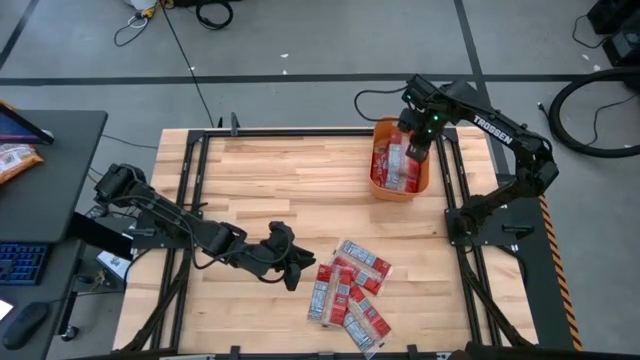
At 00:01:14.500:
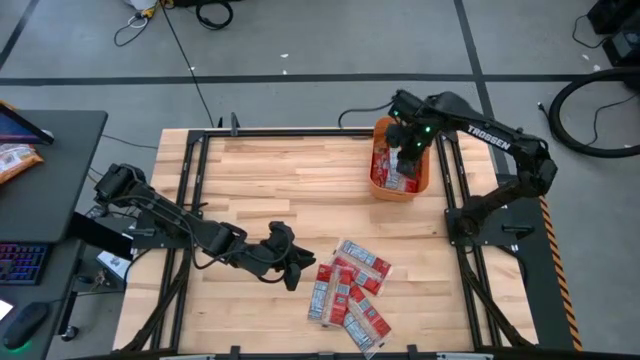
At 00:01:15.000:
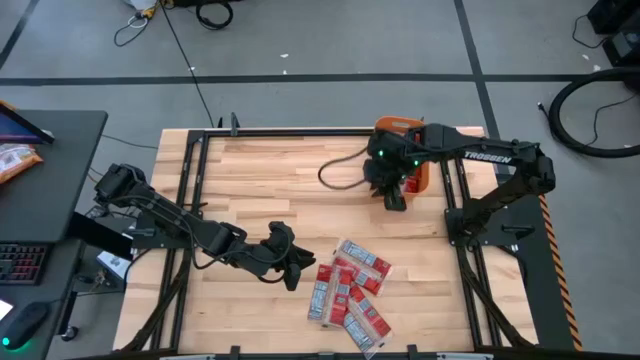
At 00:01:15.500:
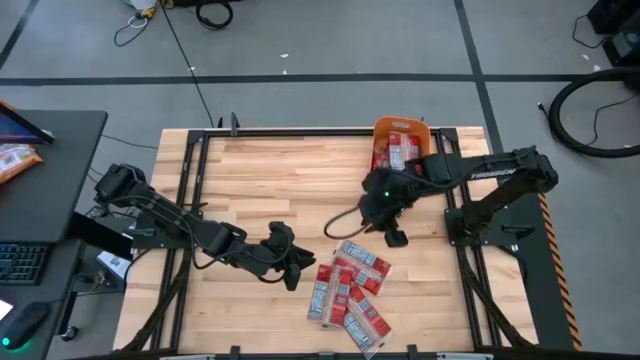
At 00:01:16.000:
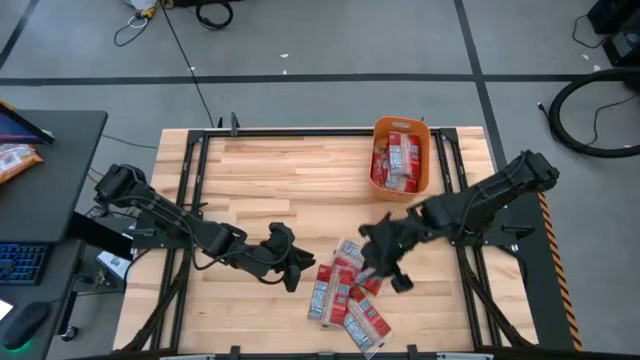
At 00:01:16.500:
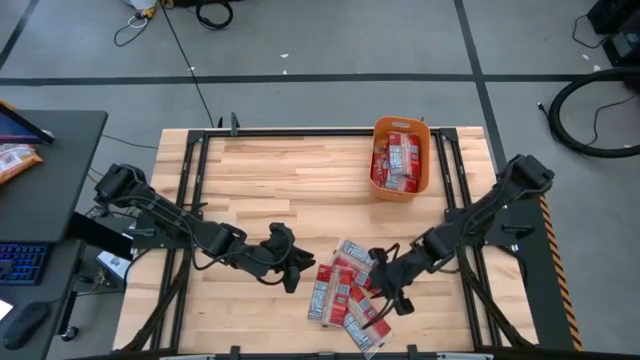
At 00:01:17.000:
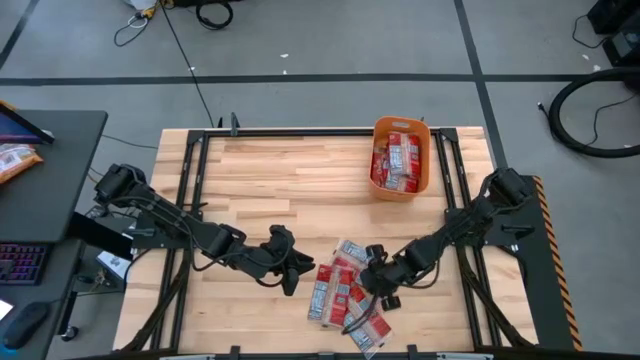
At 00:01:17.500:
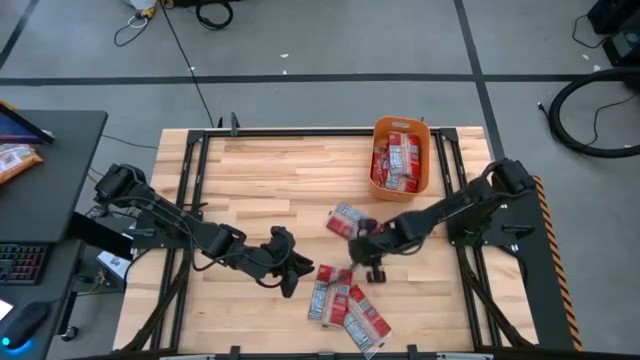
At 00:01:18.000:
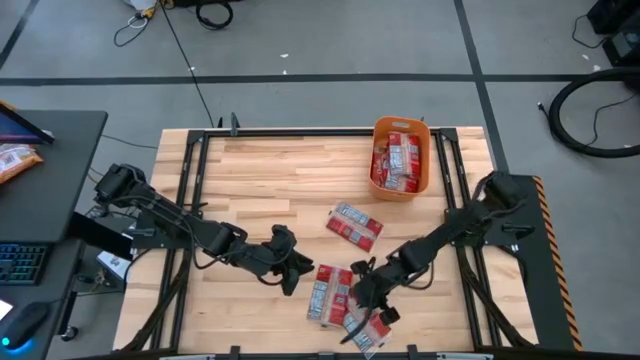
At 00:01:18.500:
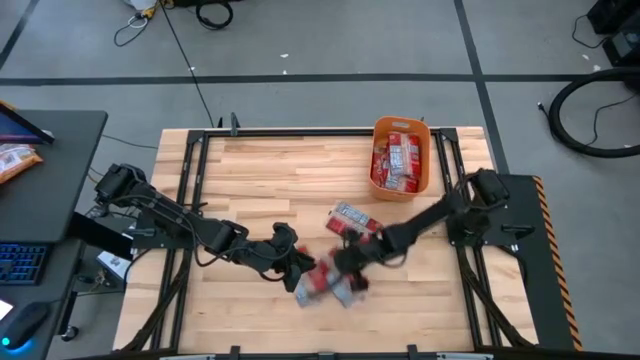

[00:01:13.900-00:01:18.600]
Task: Sort popcorn bags into baskets
Move the red popcorn bags to the center of the table

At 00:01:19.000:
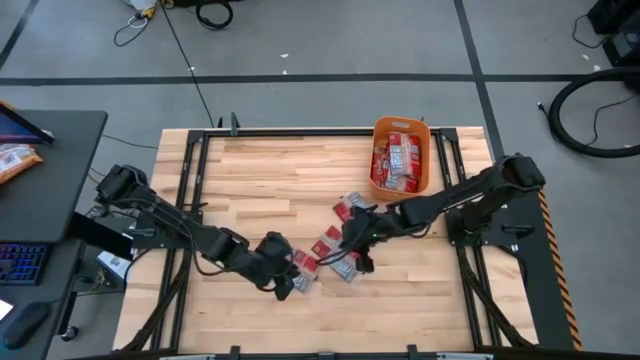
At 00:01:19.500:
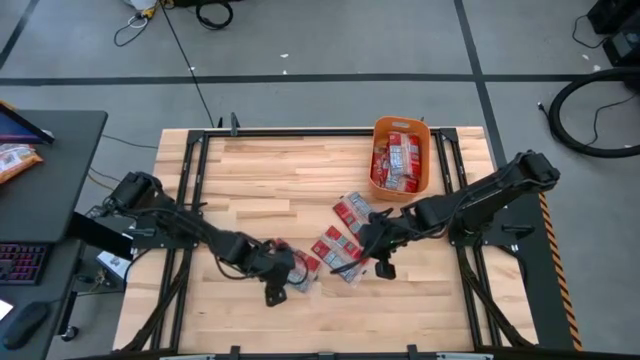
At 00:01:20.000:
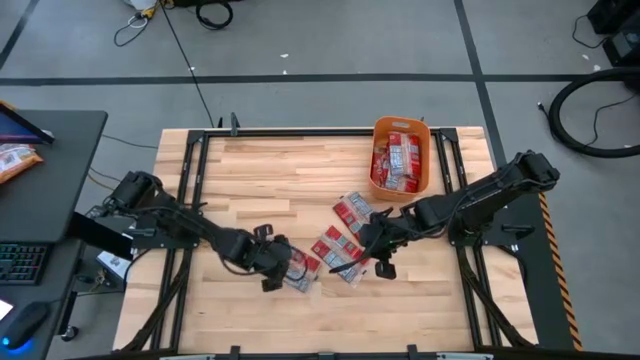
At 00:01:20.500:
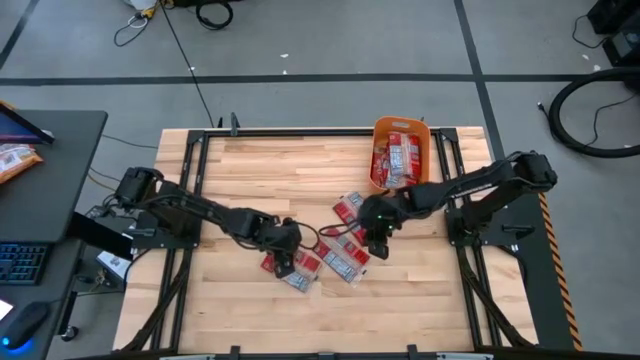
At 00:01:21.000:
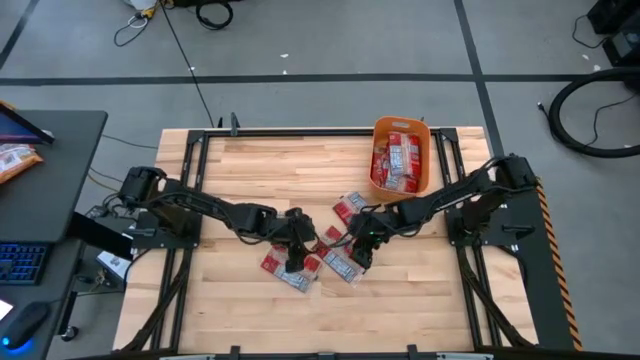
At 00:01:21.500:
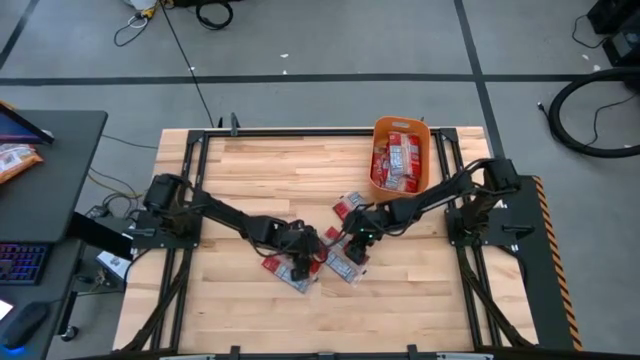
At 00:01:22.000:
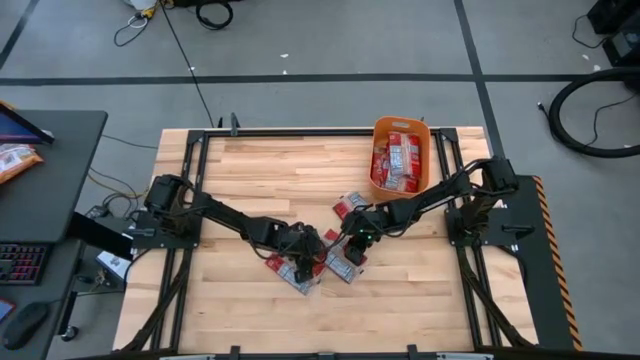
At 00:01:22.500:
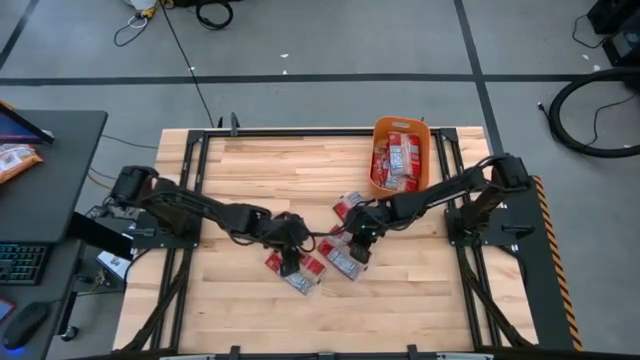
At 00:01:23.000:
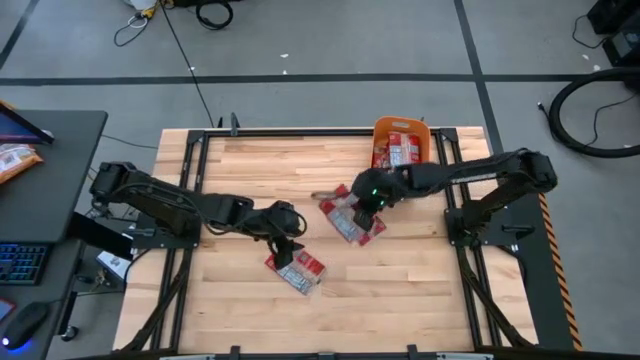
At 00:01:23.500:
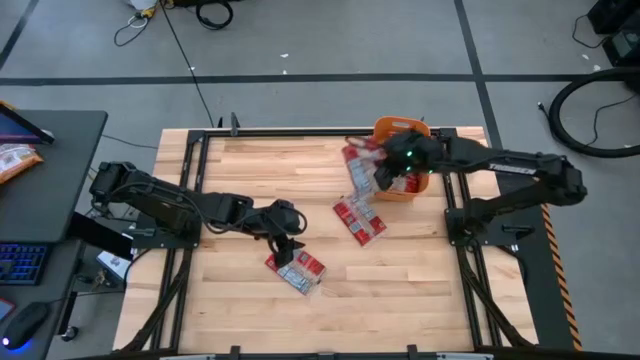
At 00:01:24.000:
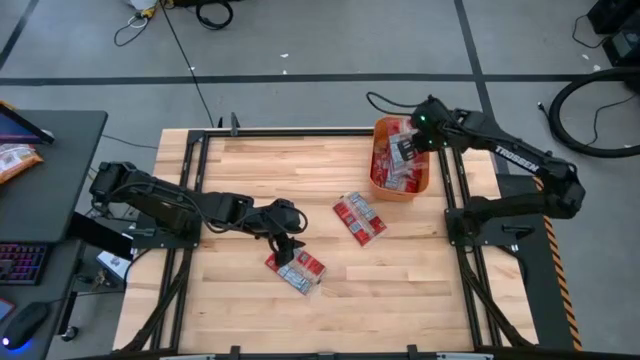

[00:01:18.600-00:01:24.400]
Put the red popcorn bag into the orange bin

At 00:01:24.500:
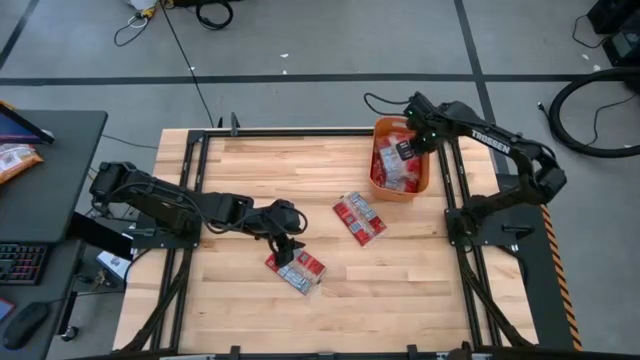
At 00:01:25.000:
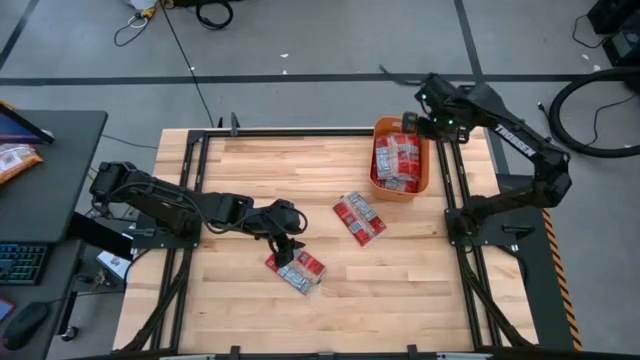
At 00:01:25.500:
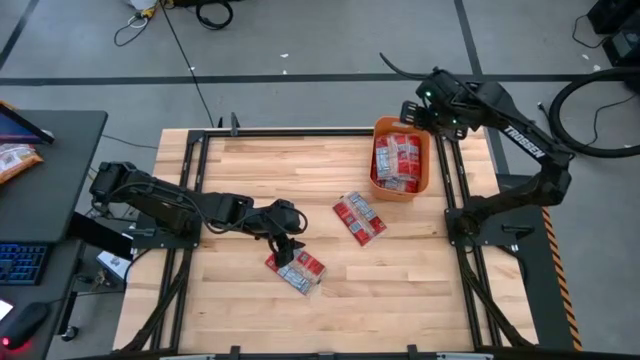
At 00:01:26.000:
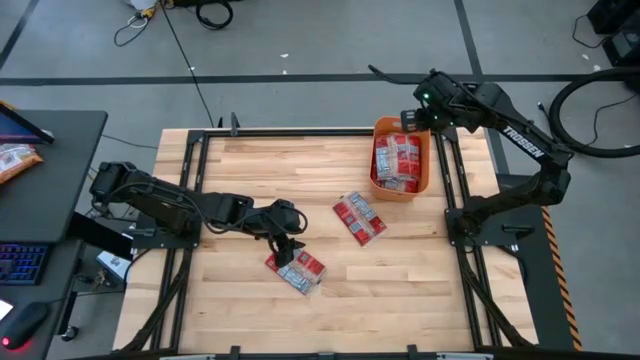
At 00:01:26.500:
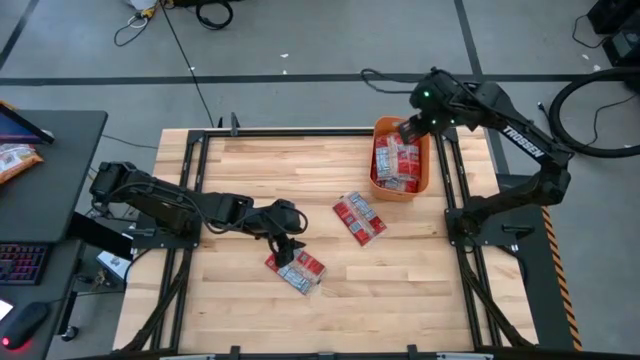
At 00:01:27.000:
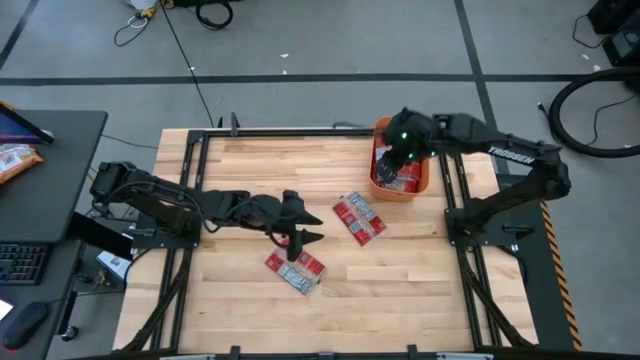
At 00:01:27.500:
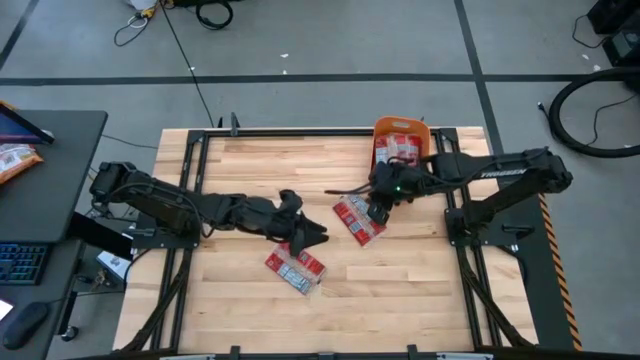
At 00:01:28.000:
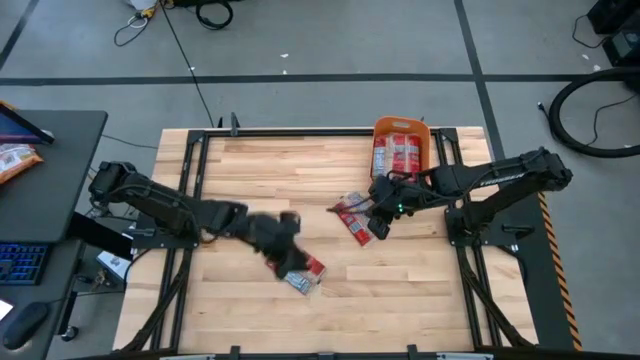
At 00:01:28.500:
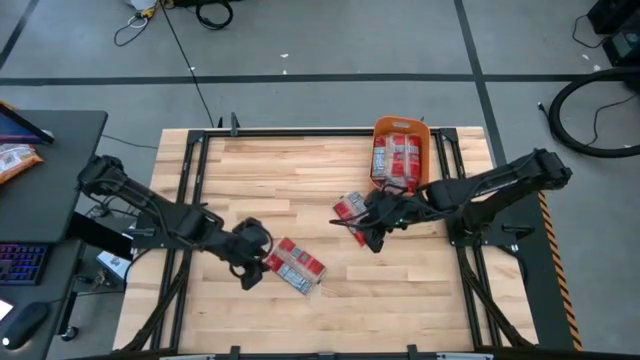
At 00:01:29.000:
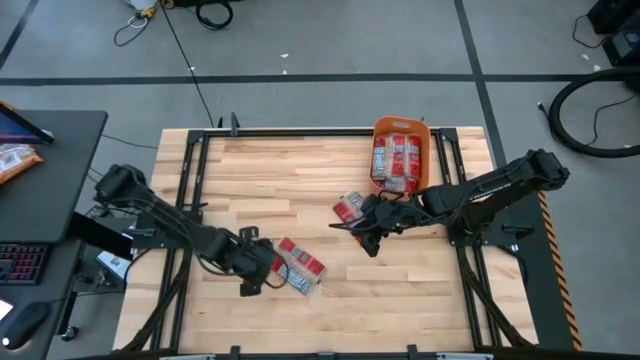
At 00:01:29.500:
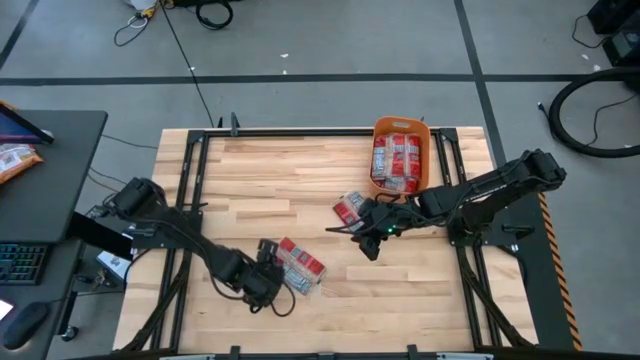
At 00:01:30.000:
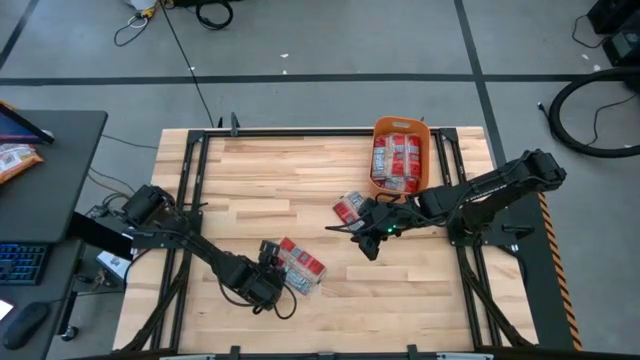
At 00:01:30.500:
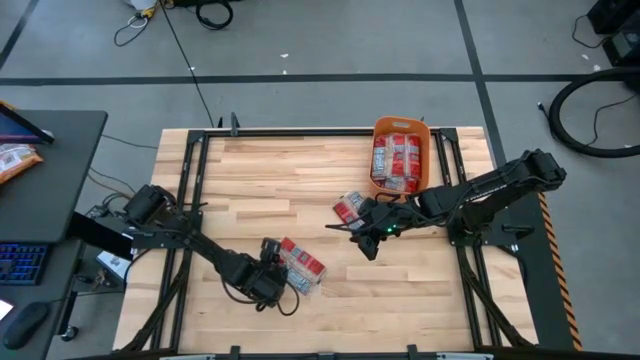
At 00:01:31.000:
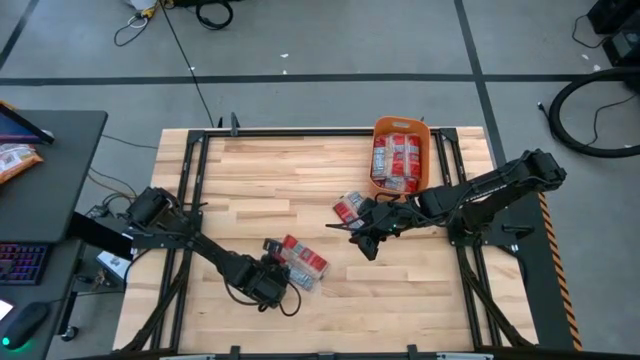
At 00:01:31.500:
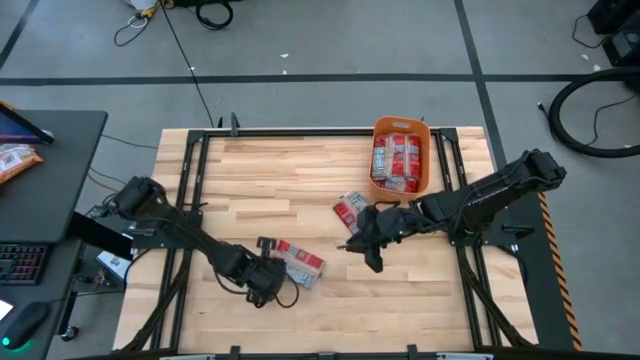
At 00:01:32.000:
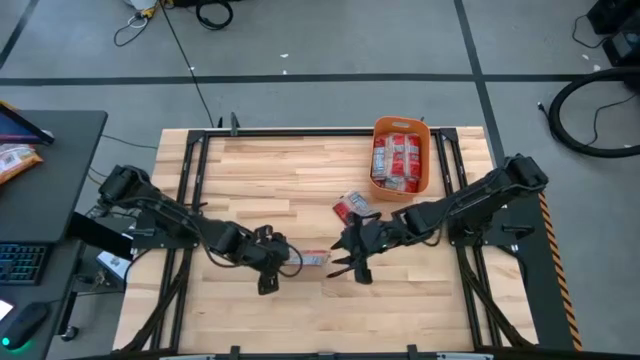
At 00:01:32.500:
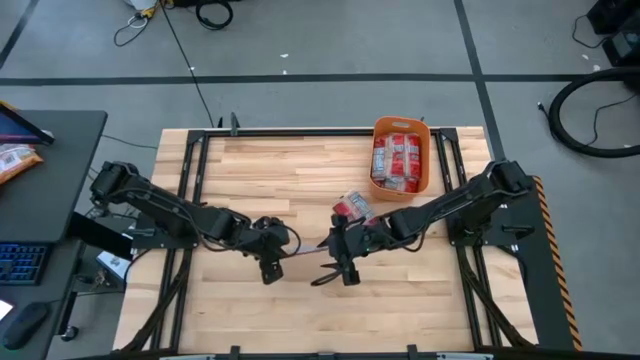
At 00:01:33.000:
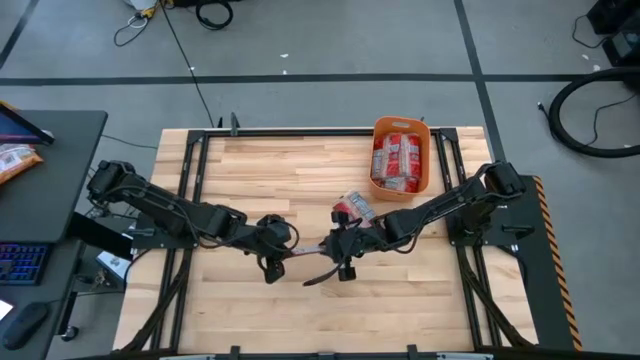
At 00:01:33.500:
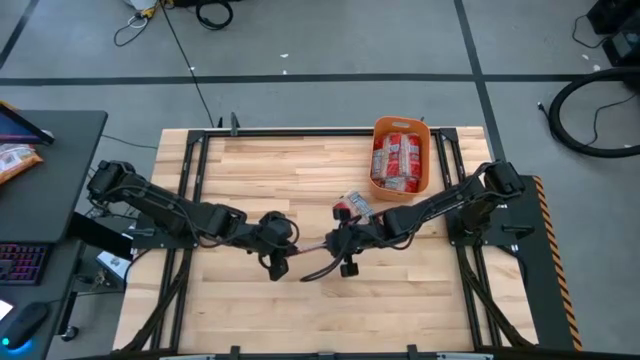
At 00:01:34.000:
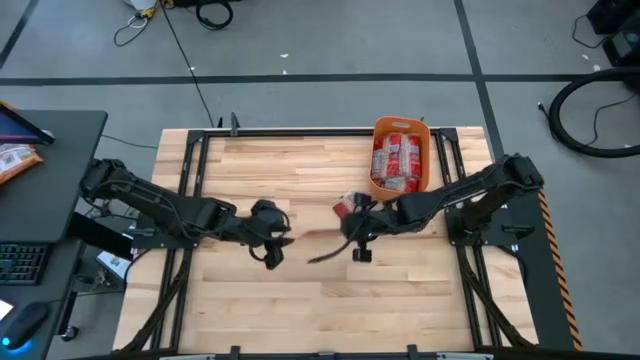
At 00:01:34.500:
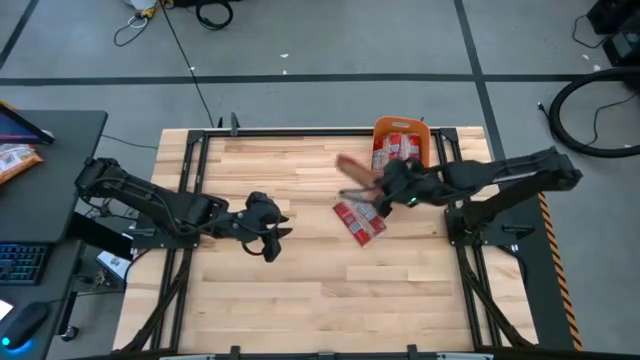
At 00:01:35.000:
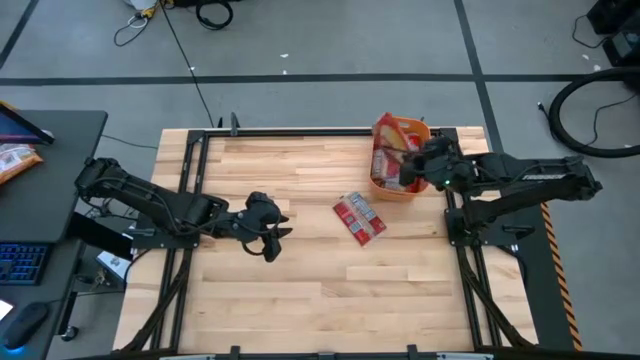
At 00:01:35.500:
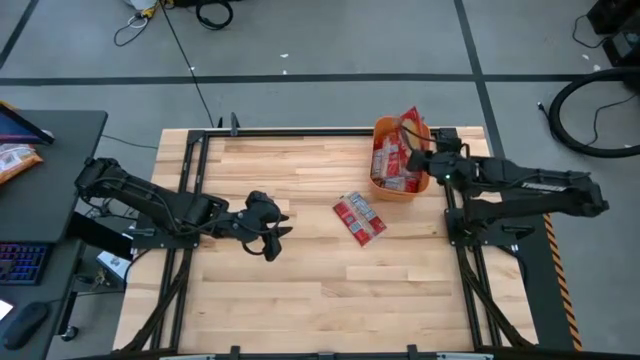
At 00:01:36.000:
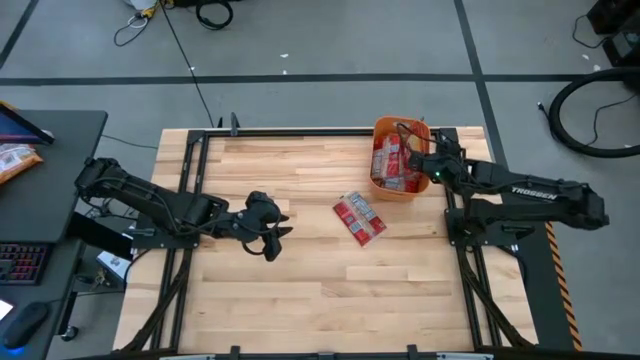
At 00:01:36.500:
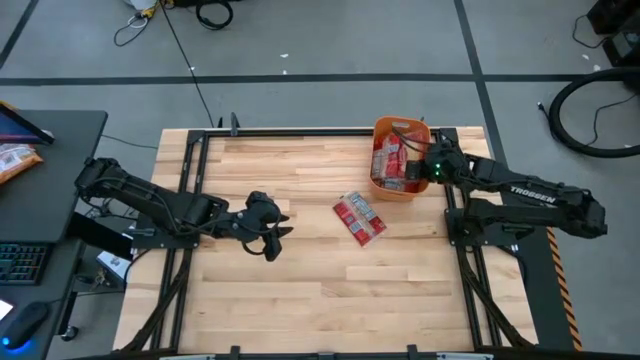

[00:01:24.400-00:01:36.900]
Put the red popcorn bag into the orange bin
